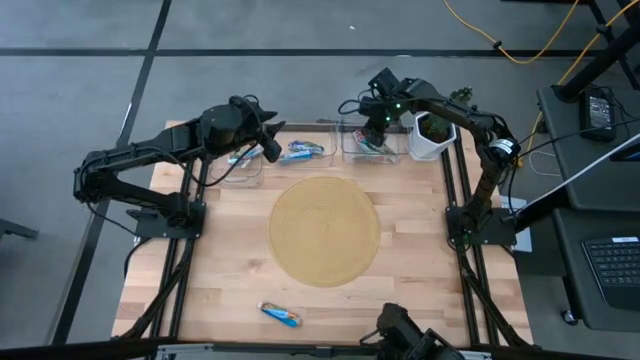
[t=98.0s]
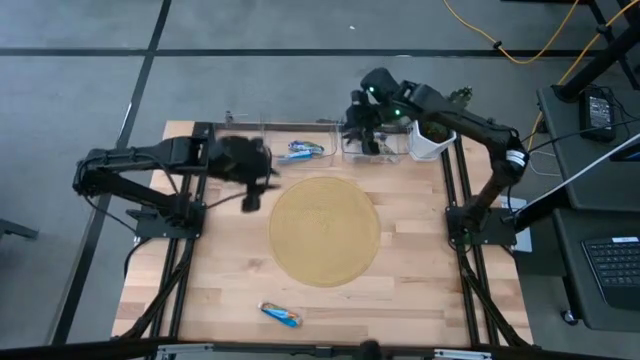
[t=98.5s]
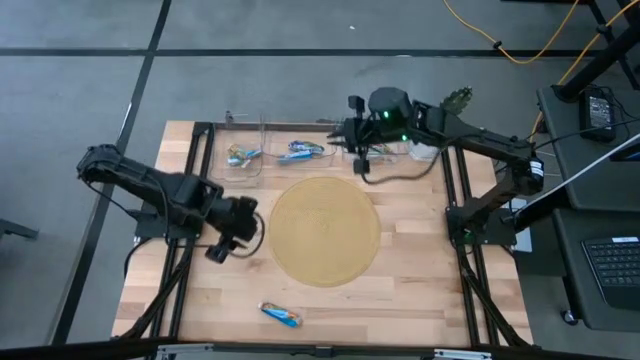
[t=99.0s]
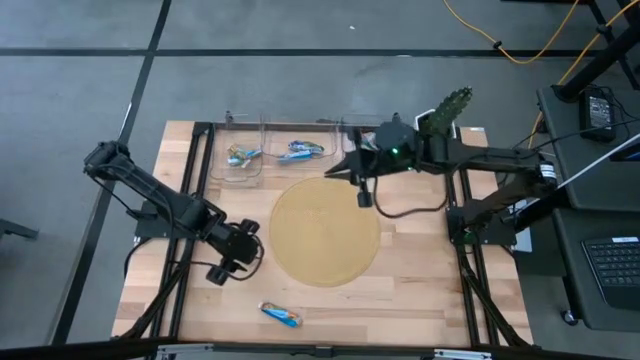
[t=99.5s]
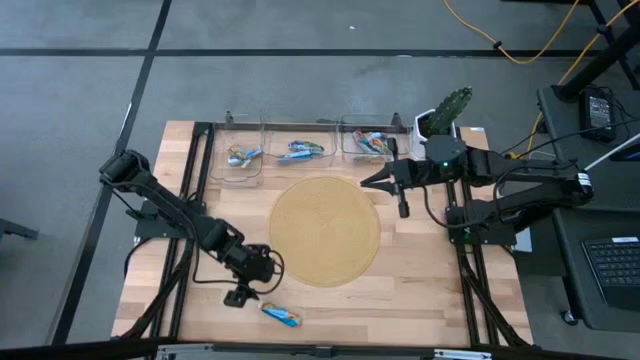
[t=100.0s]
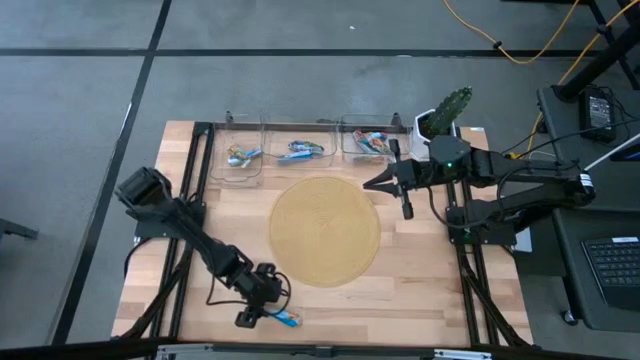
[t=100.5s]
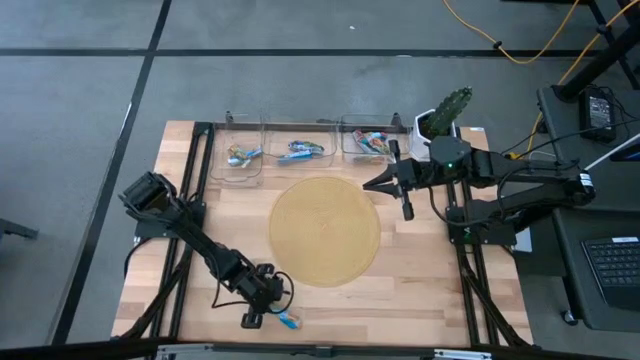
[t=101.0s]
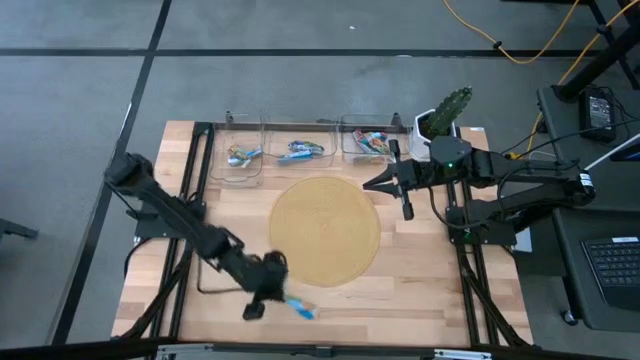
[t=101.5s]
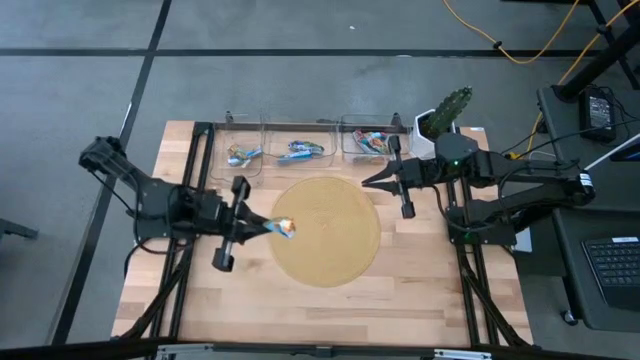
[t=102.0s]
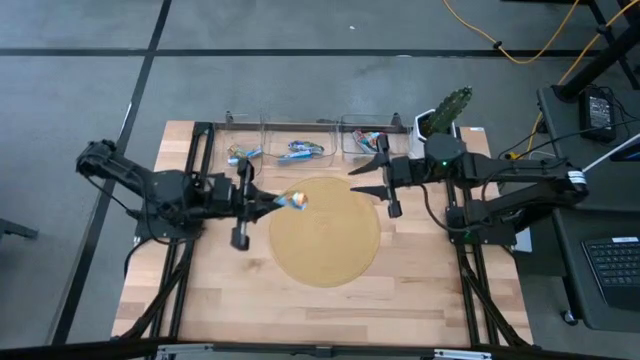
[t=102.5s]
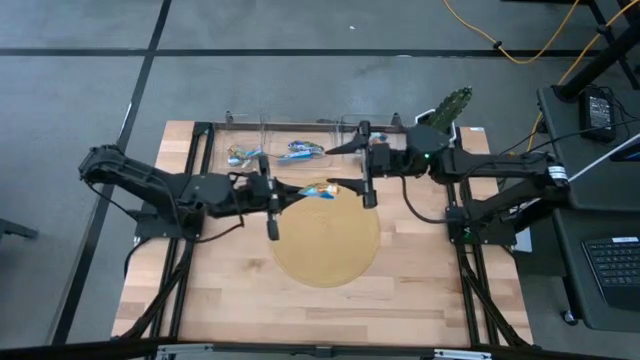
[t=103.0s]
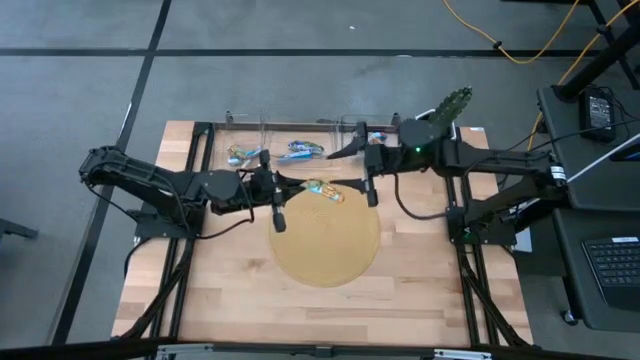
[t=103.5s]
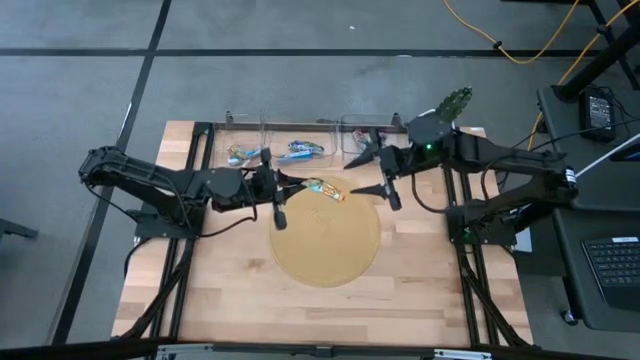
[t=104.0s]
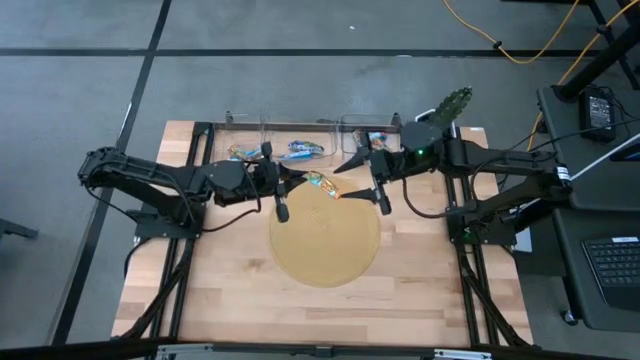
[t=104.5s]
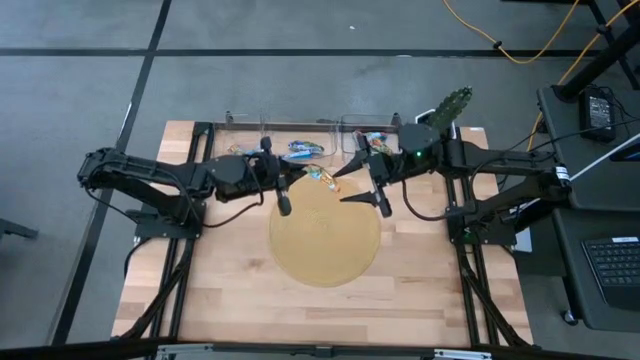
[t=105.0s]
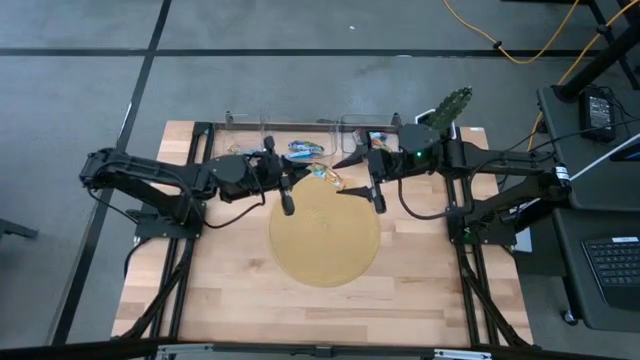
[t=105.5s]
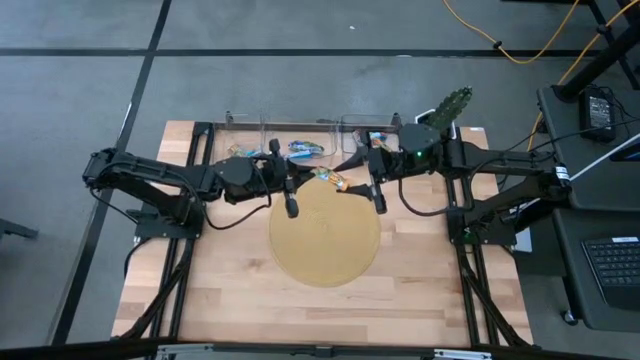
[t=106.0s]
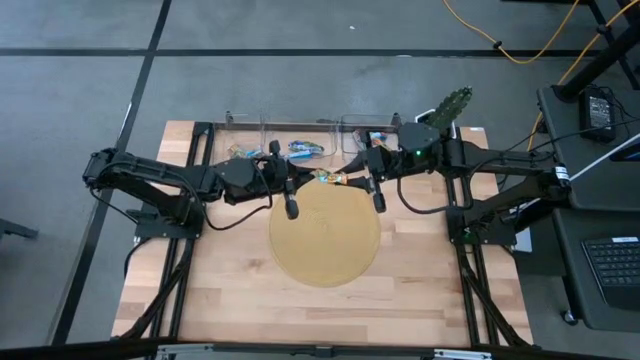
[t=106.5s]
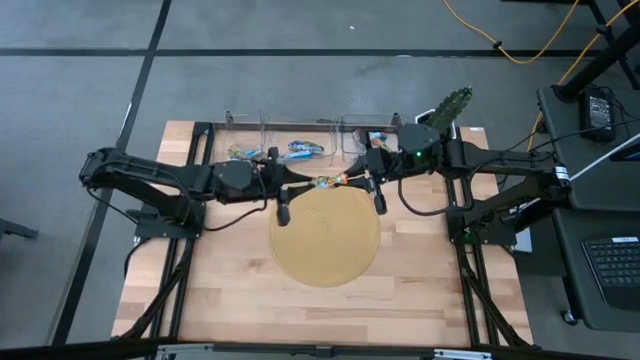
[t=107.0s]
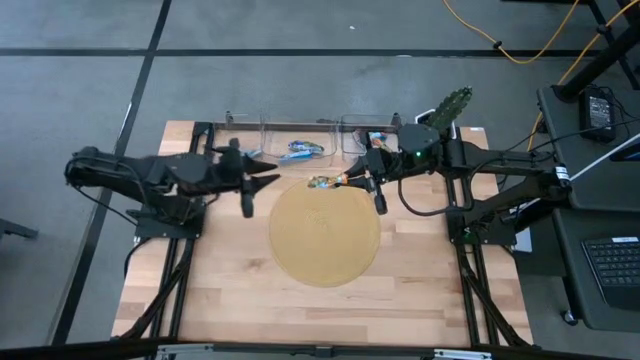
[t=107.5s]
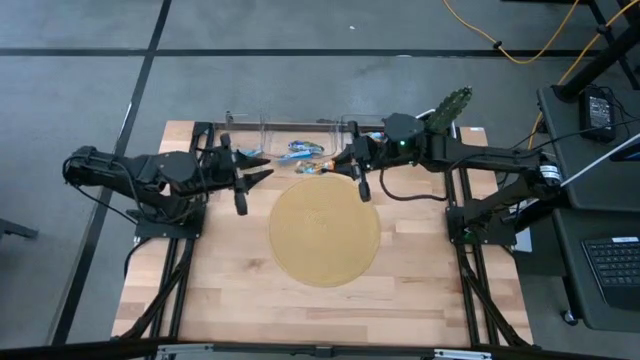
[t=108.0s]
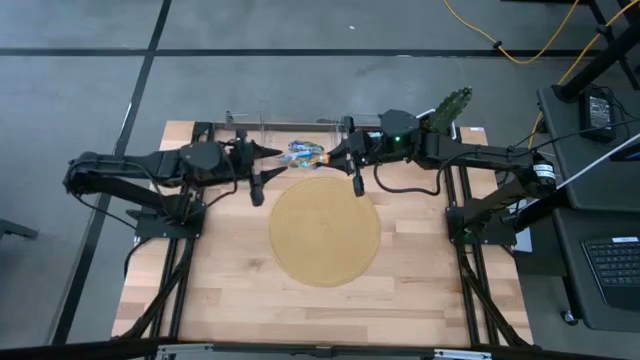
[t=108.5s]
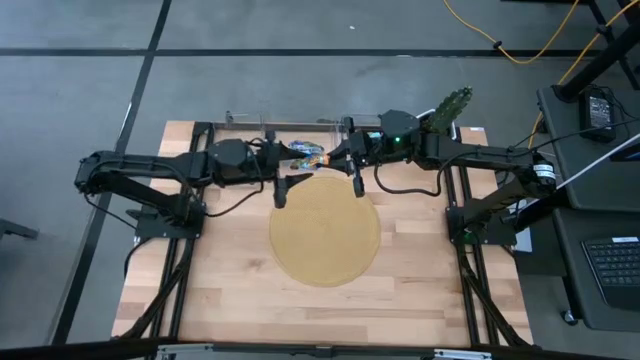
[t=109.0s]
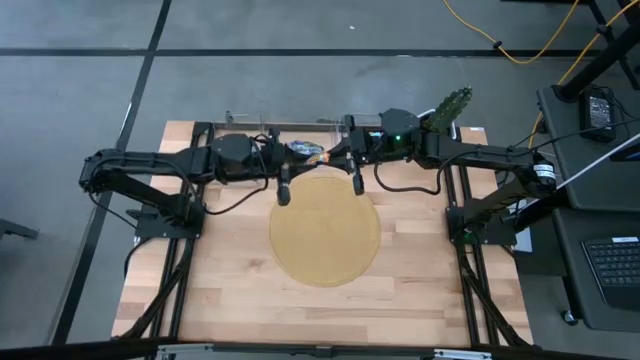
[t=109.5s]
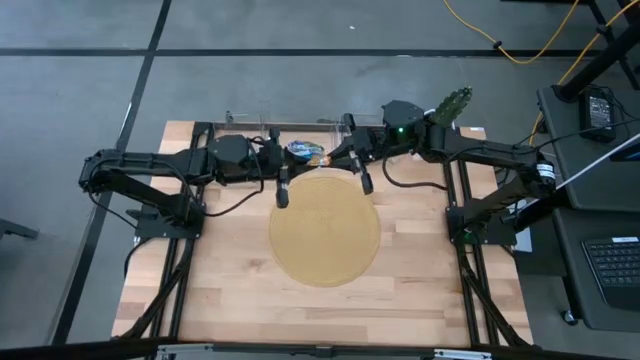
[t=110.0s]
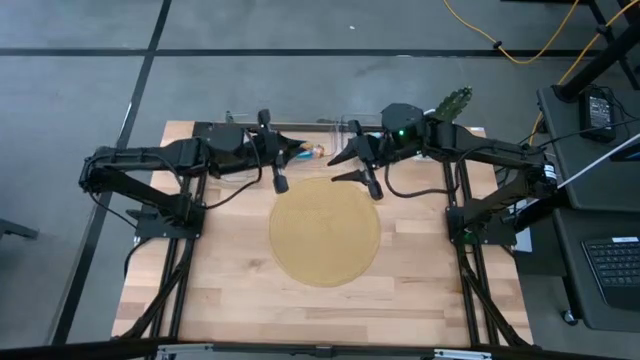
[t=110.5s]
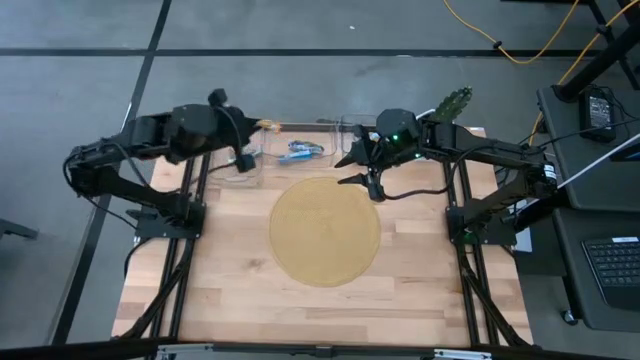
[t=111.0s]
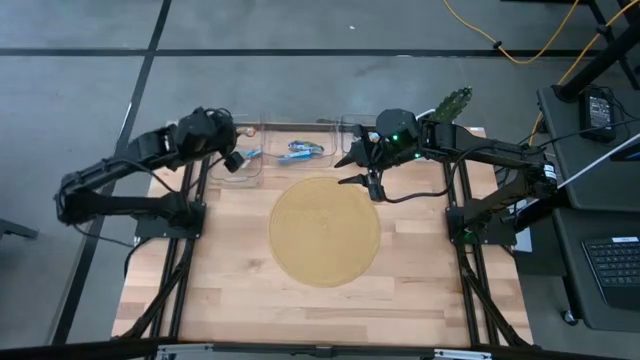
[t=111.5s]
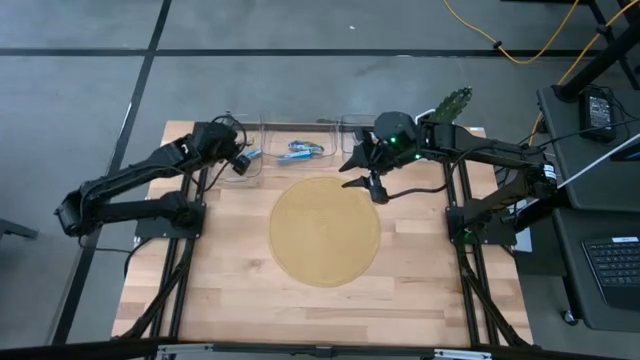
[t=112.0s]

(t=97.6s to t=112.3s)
Task: Pick and place Granola Bars by type
Put the yellow granola bar into the left transparent bin

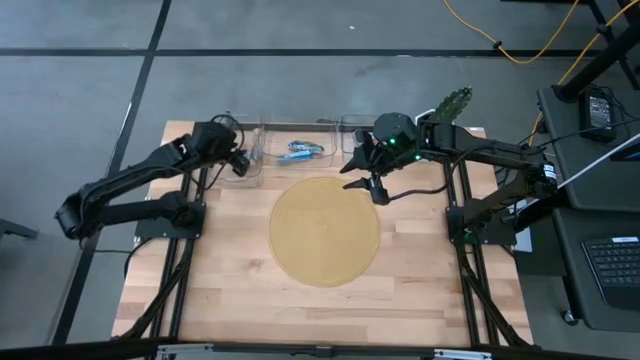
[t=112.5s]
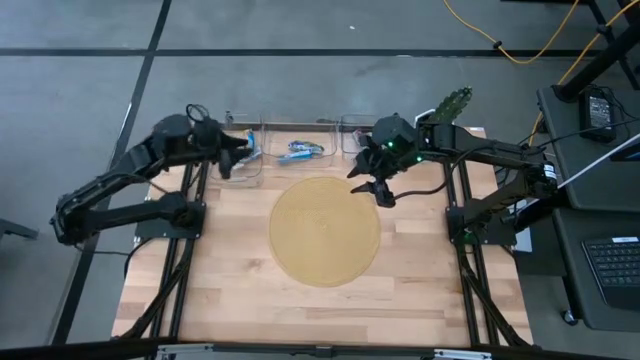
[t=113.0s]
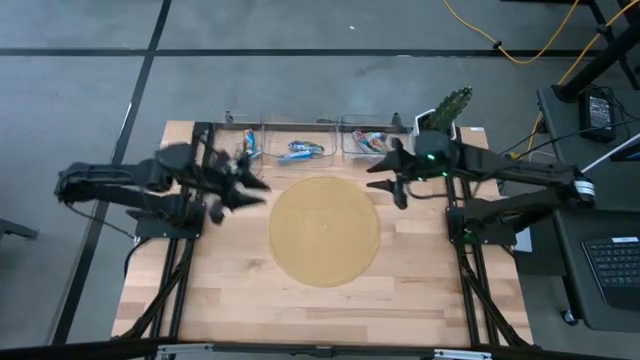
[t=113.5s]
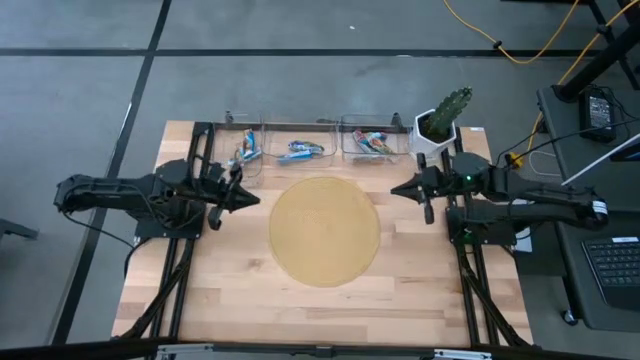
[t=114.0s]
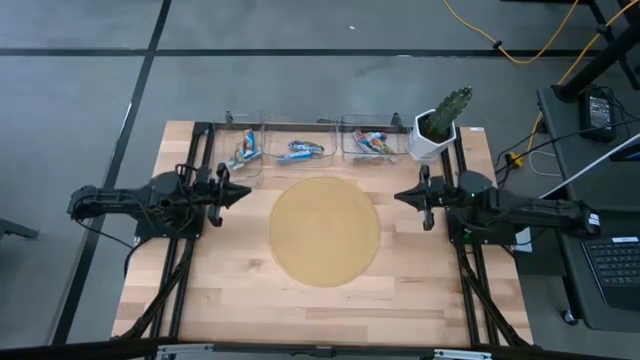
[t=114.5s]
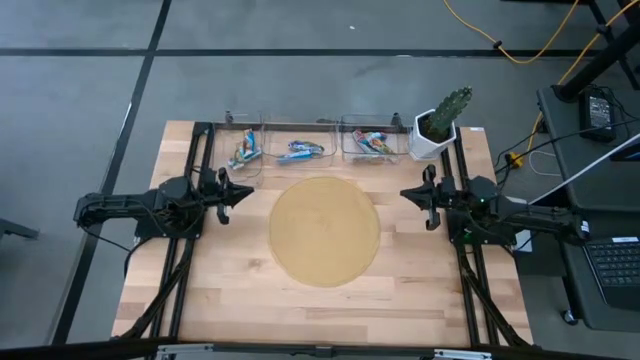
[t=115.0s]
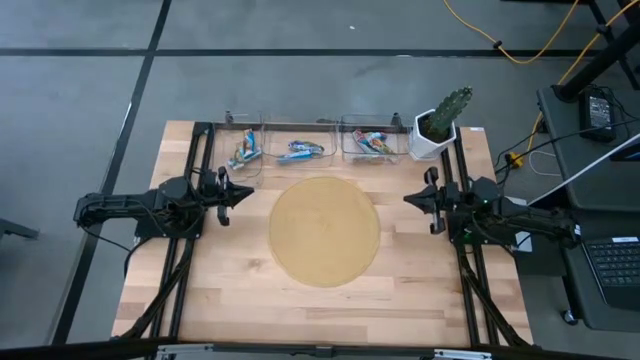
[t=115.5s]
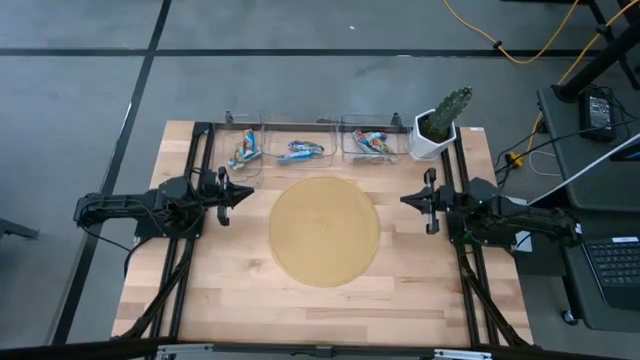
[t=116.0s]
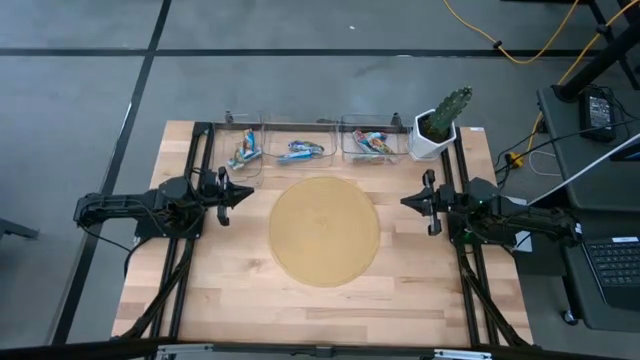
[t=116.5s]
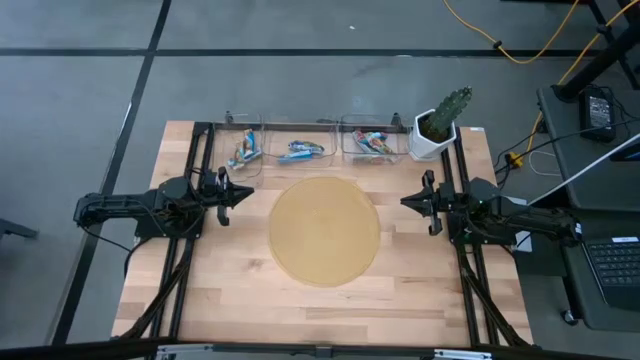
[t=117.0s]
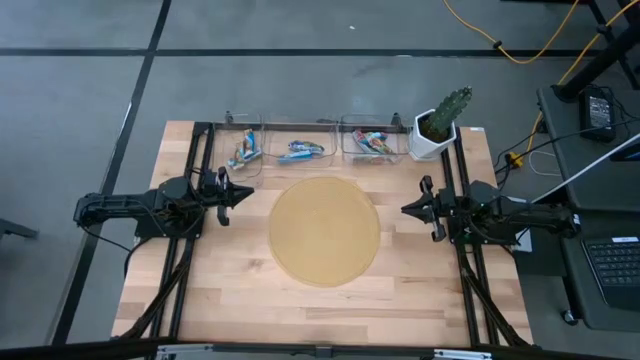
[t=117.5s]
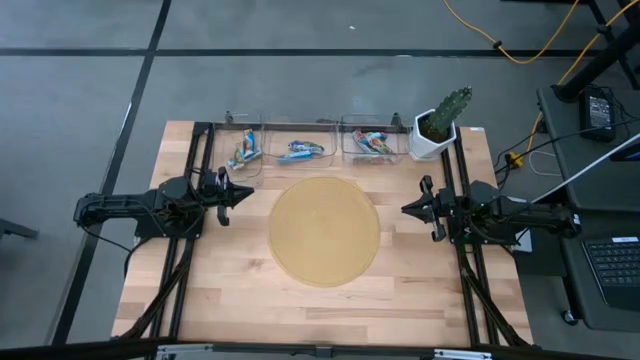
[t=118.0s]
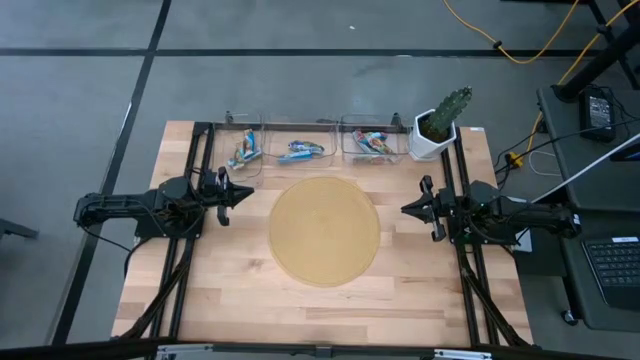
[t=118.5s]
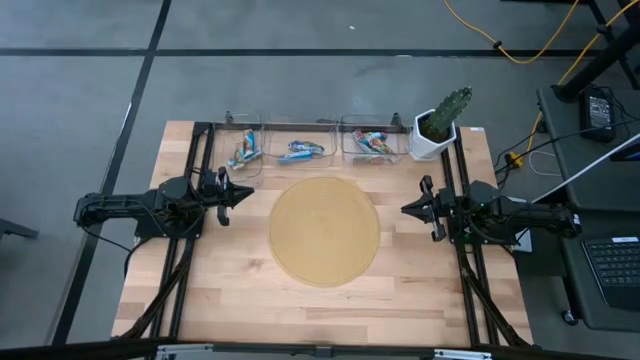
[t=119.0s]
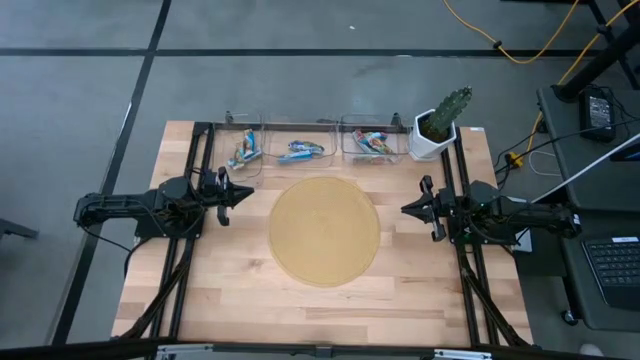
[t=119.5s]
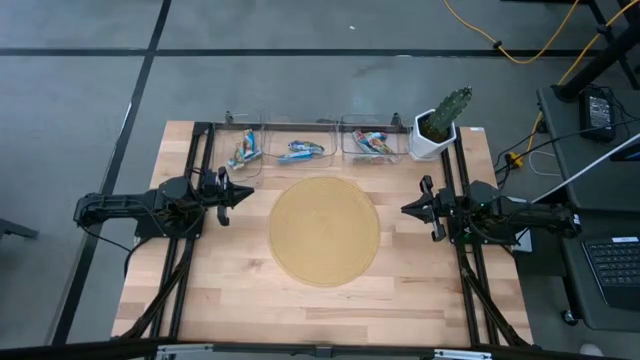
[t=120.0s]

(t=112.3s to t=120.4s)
Return to Home Position
